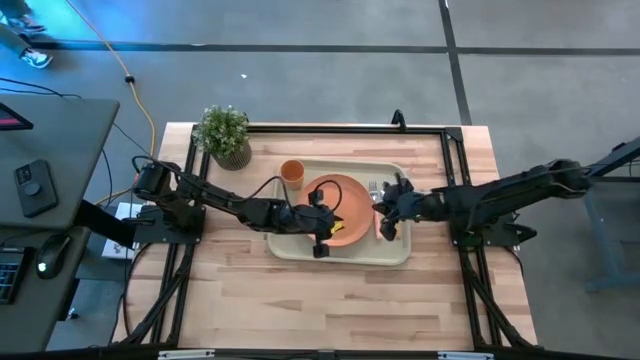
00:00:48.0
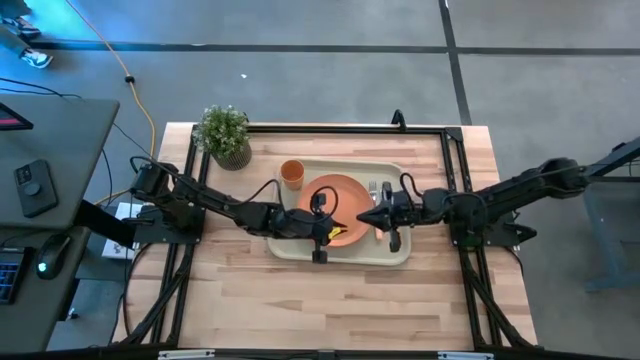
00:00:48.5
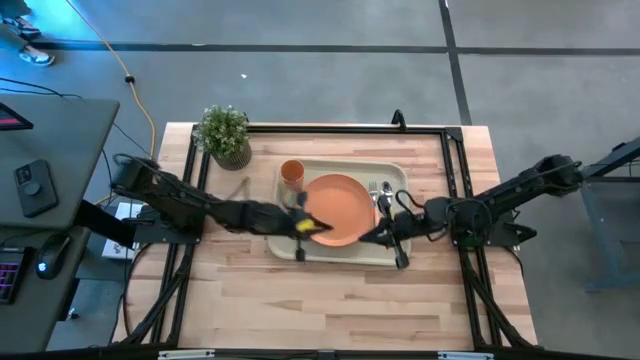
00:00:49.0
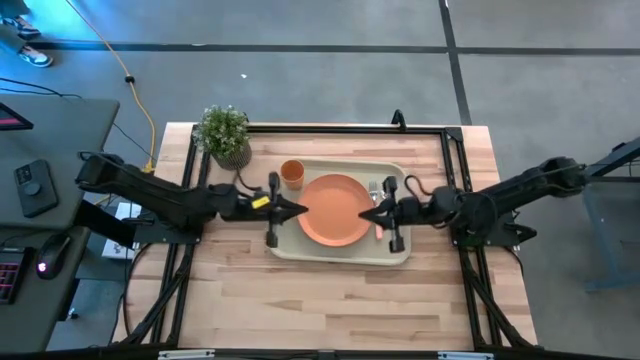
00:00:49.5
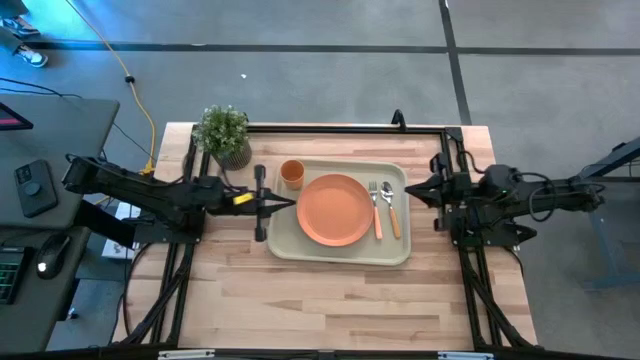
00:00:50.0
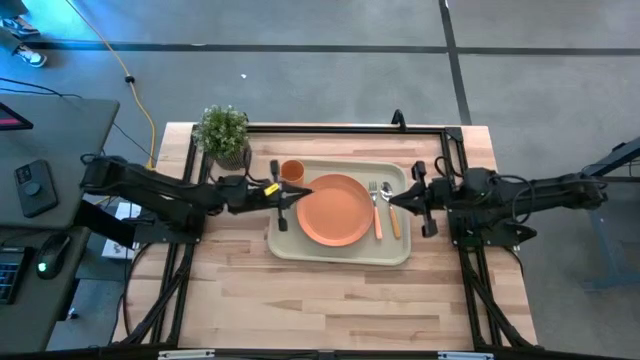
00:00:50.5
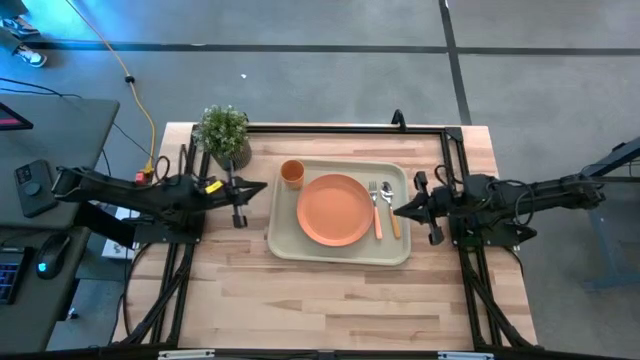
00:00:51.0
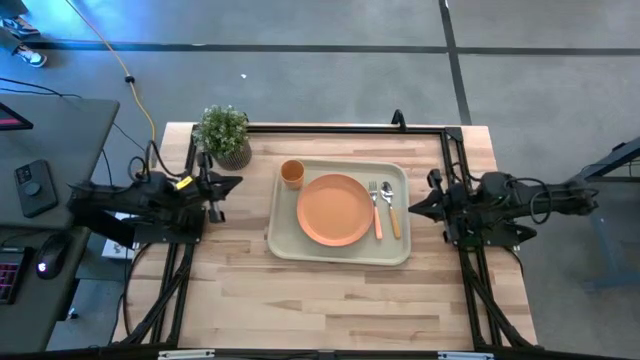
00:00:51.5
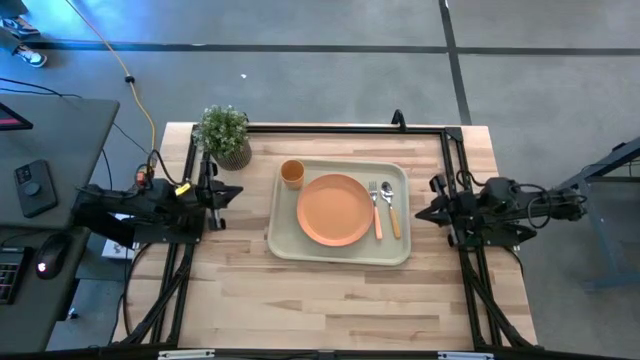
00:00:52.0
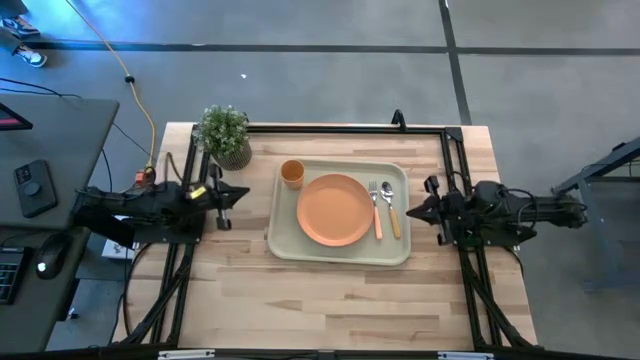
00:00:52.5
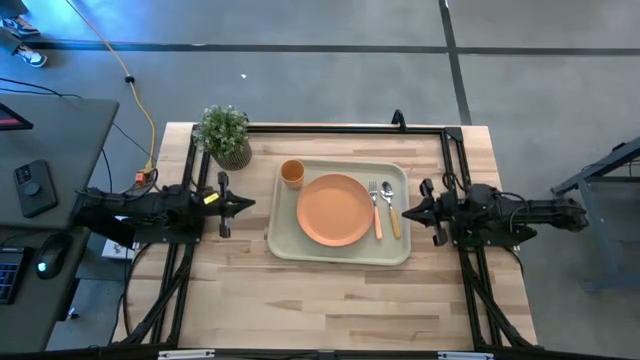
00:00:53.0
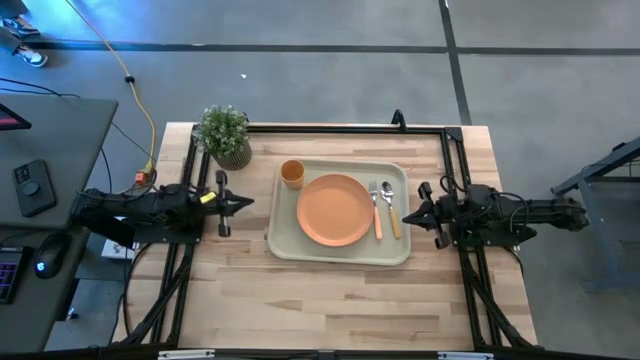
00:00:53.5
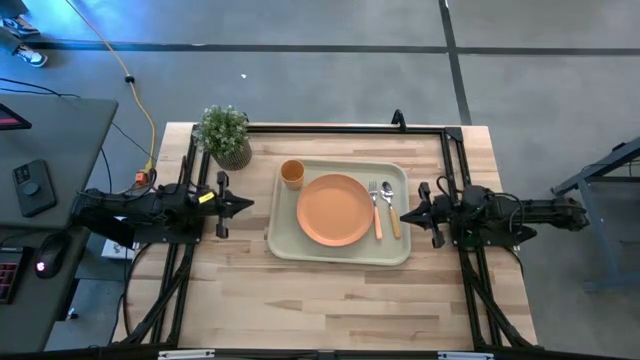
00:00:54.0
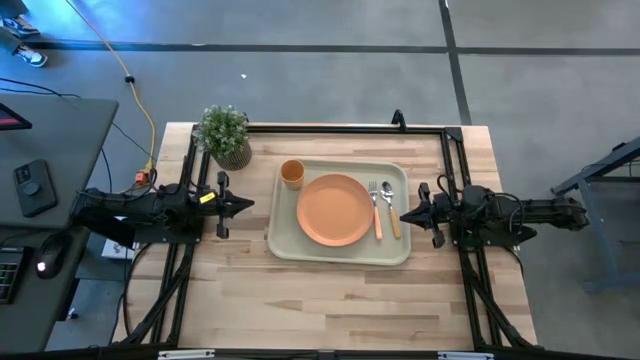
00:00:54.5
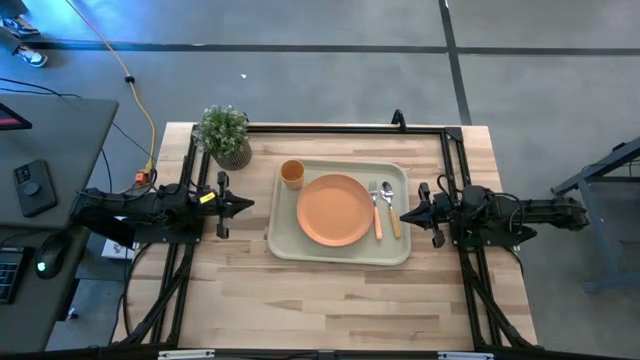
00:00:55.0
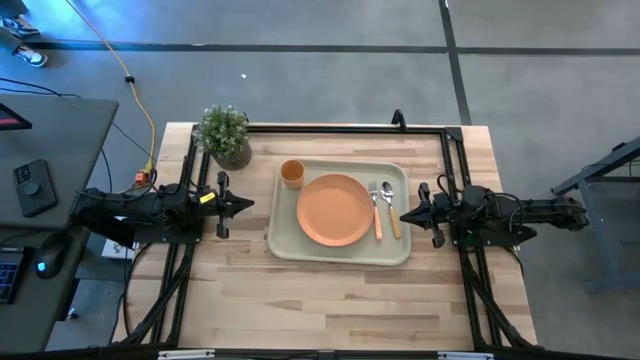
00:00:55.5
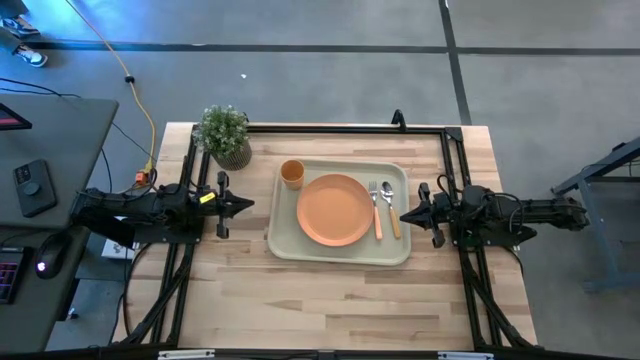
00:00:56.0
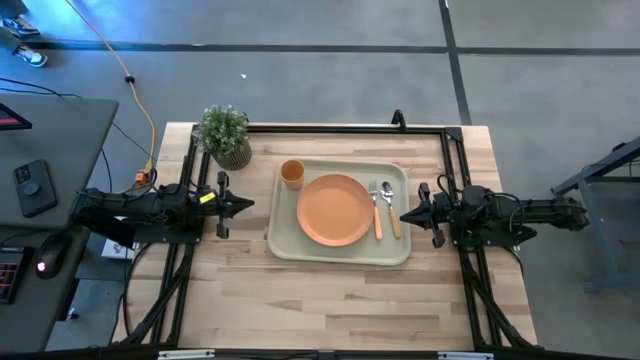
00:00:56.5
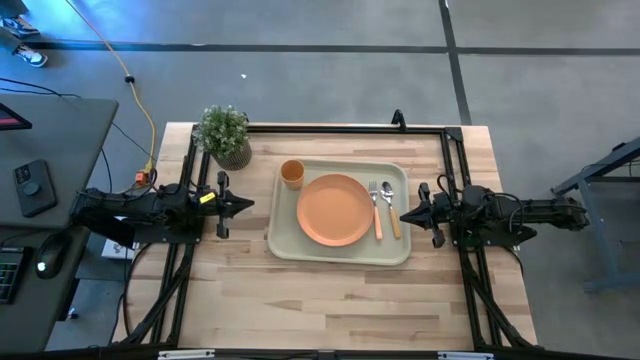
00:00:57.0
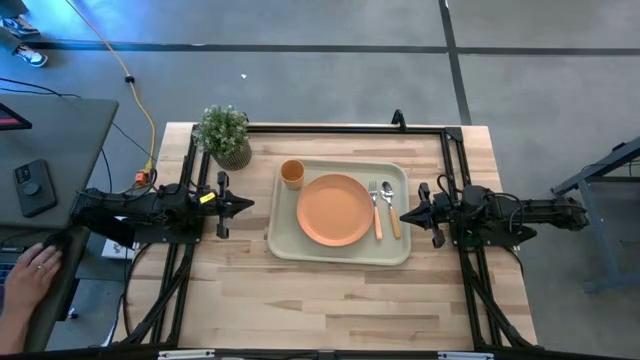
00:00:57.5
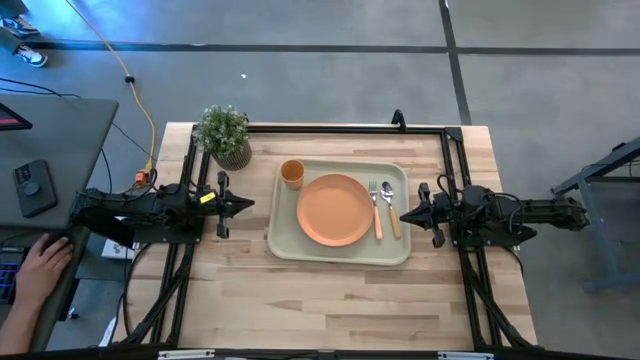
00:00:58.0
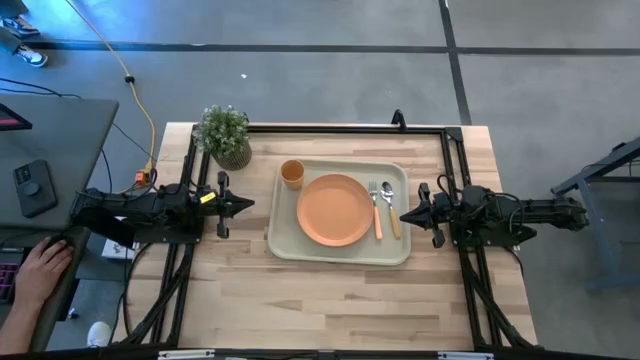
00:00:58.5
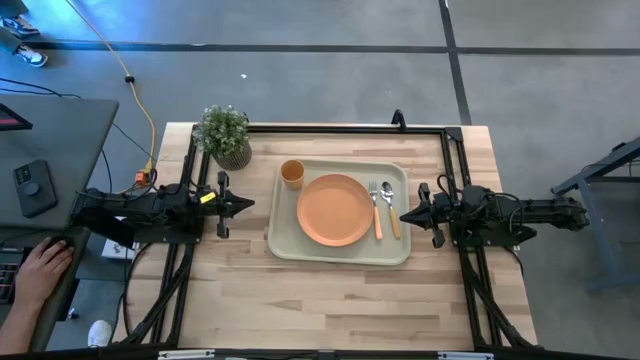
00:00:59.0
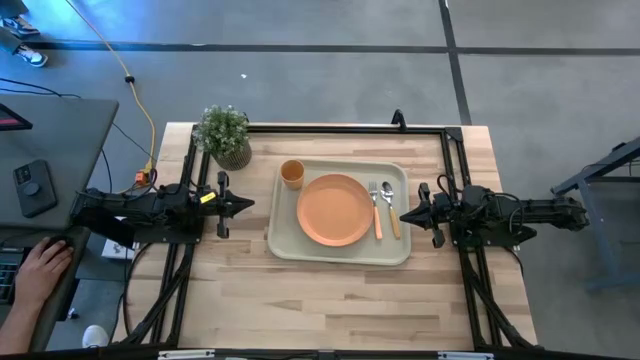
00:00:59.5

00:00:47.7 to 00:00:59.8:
Task: Pick and place plate/cup/fork/spoon on tray
Return to Home Position
